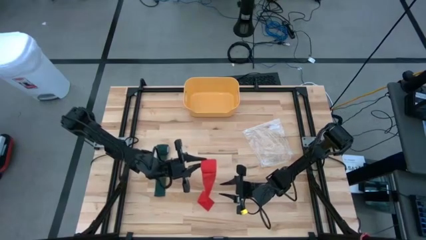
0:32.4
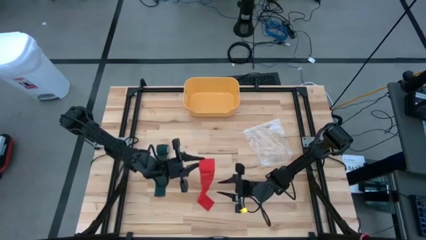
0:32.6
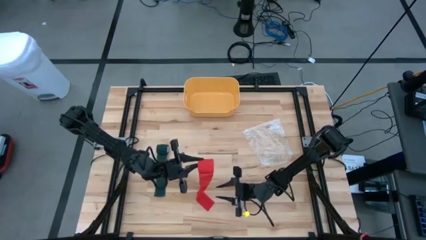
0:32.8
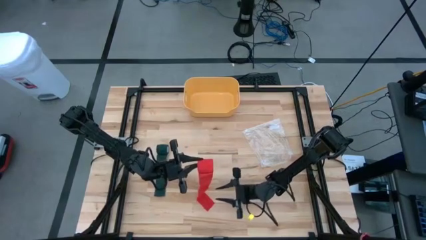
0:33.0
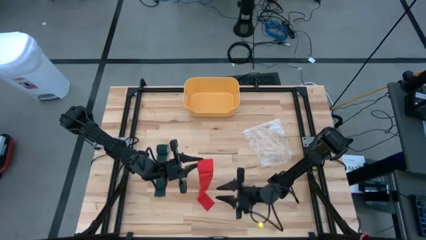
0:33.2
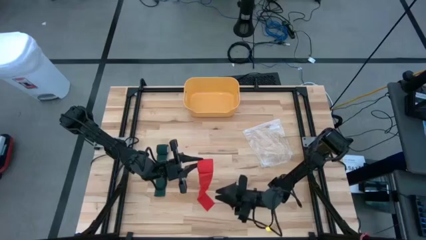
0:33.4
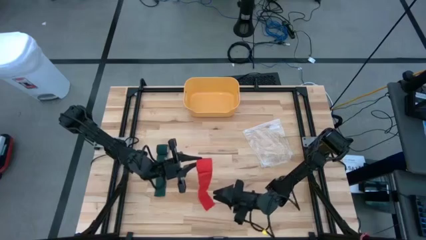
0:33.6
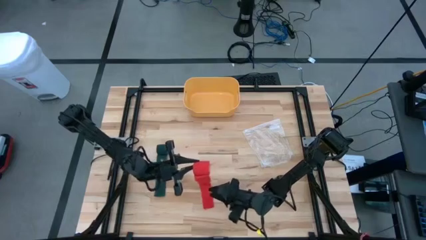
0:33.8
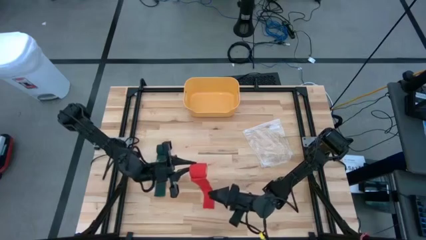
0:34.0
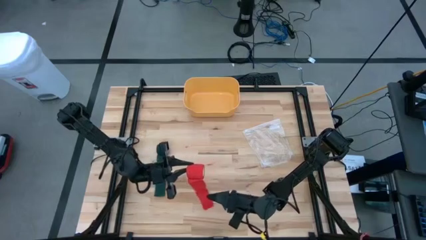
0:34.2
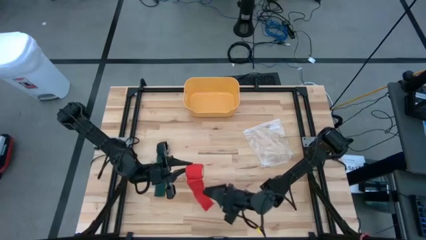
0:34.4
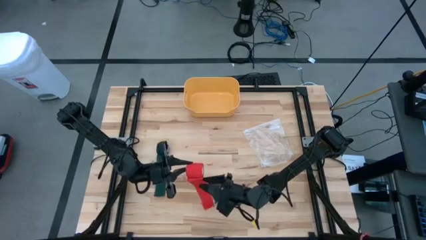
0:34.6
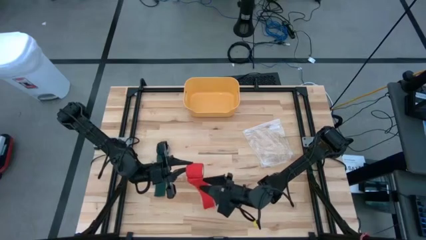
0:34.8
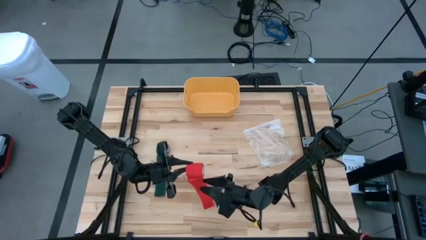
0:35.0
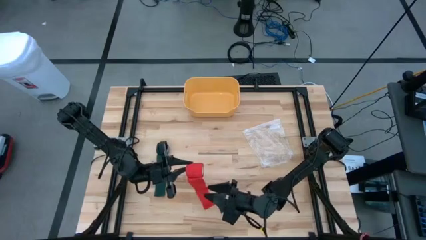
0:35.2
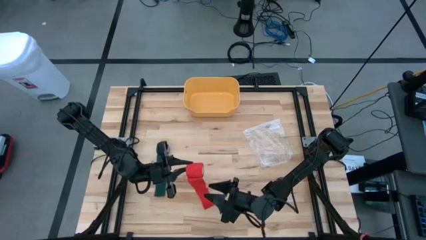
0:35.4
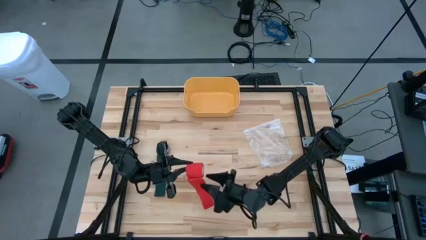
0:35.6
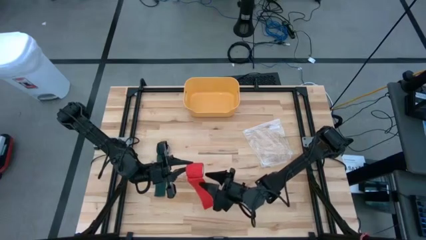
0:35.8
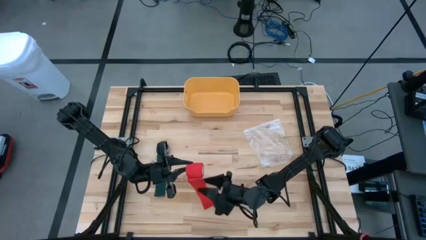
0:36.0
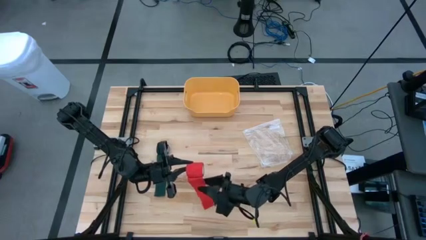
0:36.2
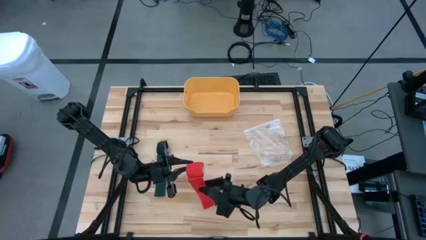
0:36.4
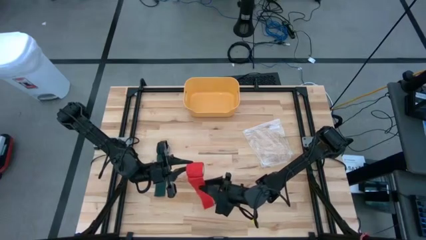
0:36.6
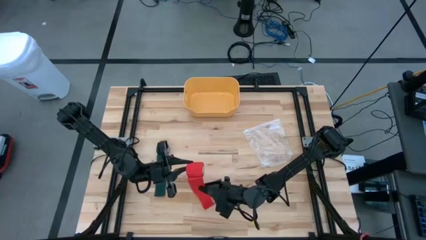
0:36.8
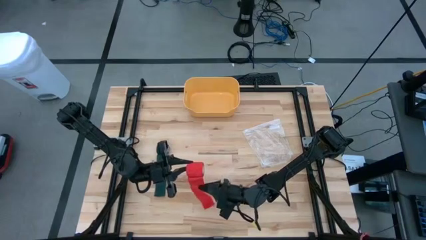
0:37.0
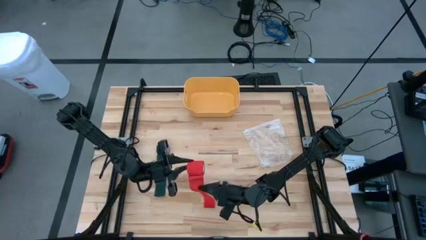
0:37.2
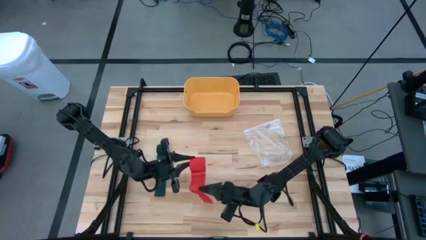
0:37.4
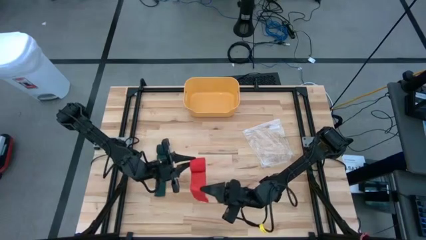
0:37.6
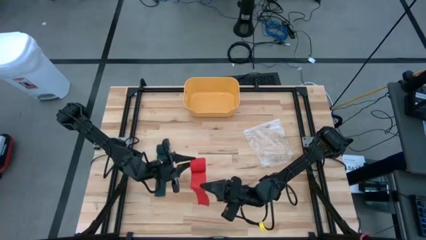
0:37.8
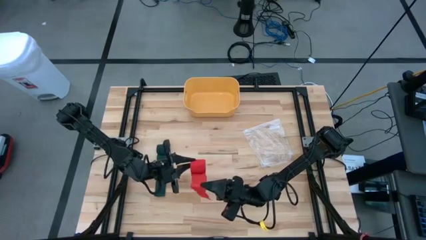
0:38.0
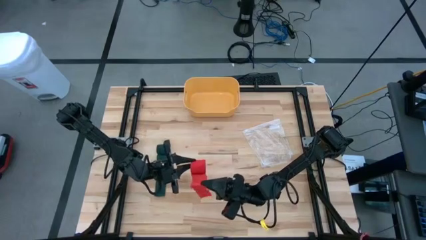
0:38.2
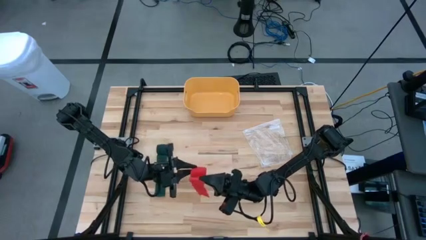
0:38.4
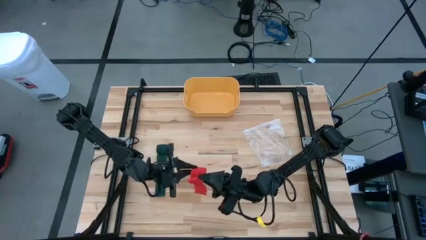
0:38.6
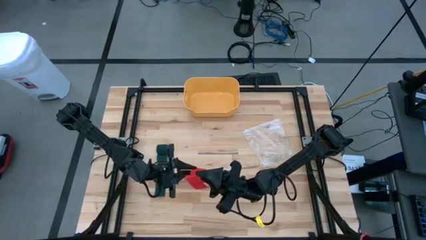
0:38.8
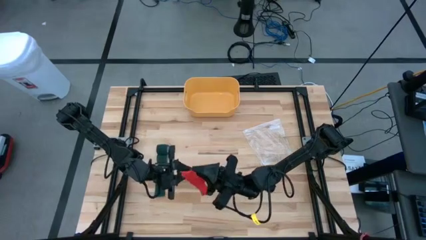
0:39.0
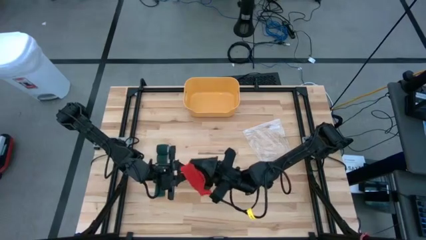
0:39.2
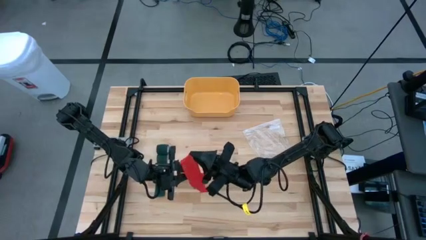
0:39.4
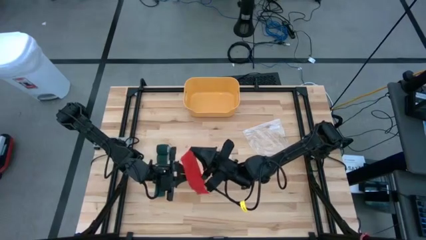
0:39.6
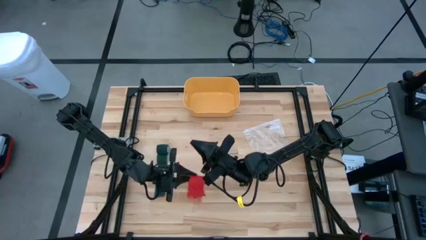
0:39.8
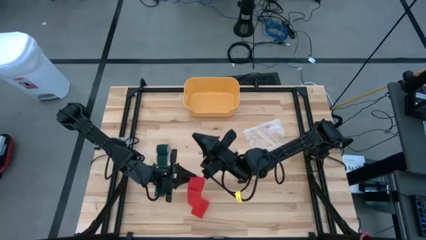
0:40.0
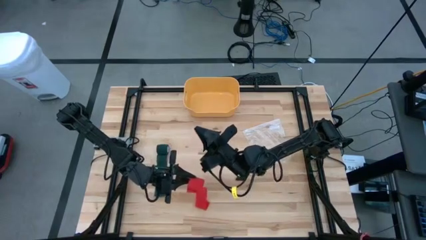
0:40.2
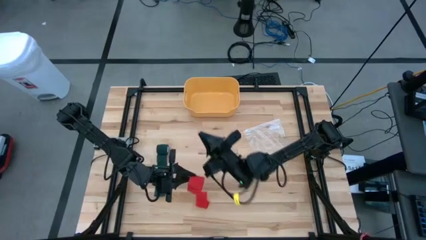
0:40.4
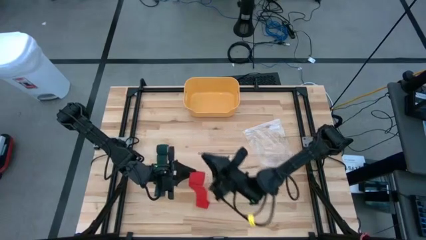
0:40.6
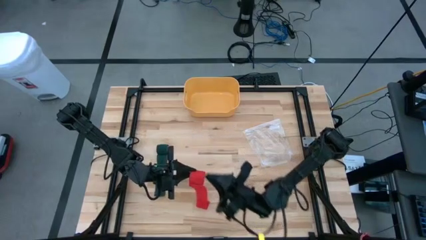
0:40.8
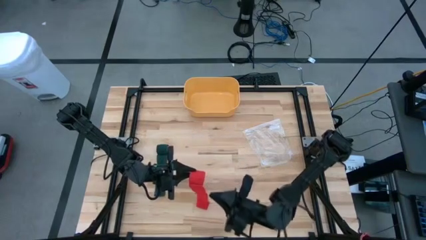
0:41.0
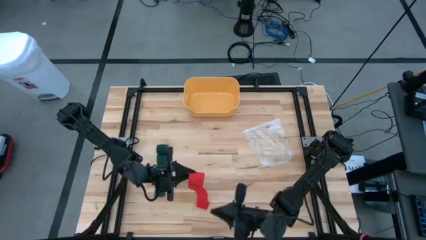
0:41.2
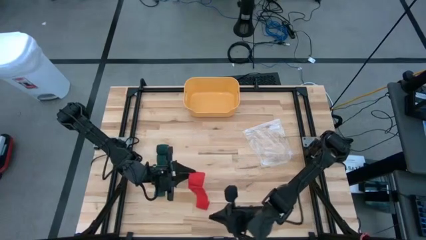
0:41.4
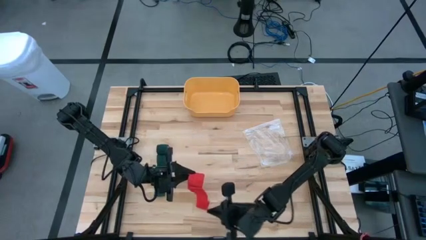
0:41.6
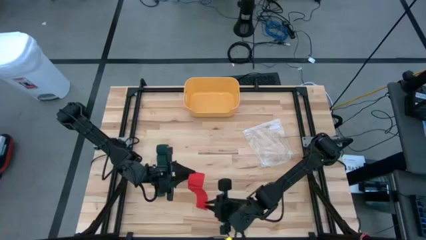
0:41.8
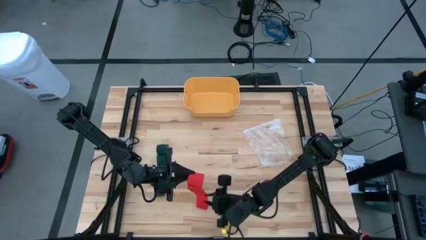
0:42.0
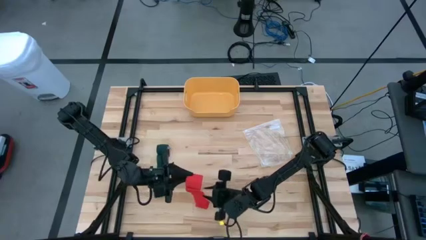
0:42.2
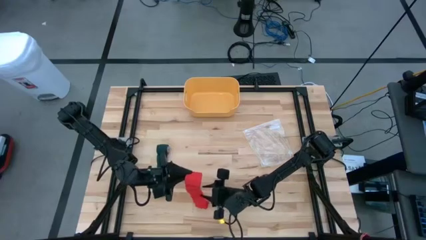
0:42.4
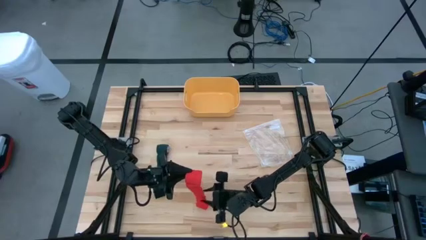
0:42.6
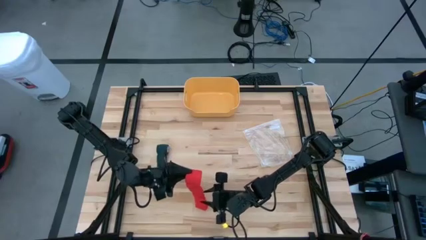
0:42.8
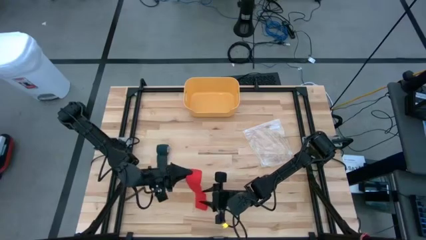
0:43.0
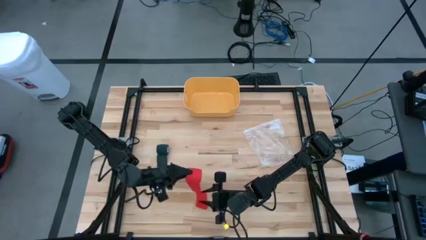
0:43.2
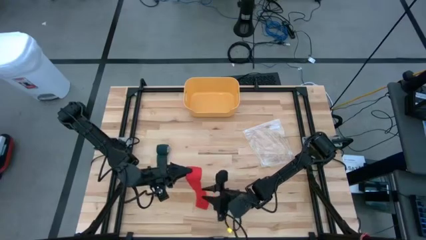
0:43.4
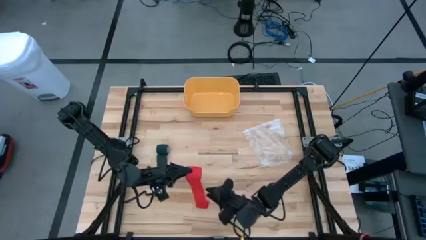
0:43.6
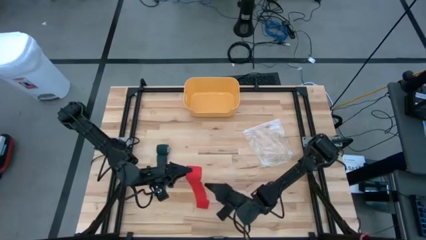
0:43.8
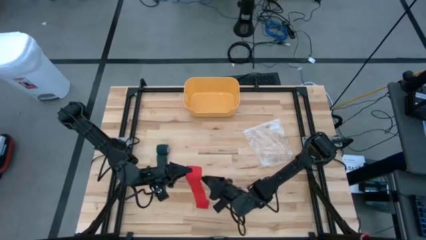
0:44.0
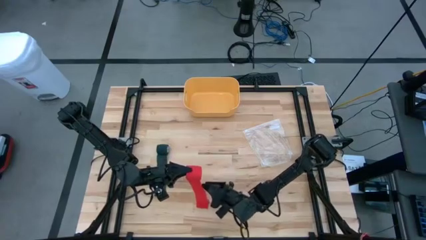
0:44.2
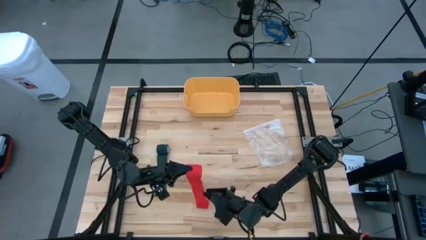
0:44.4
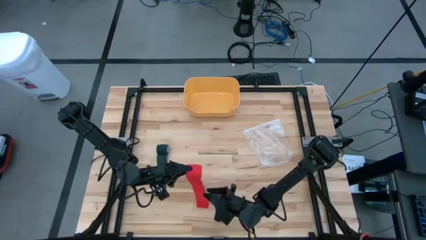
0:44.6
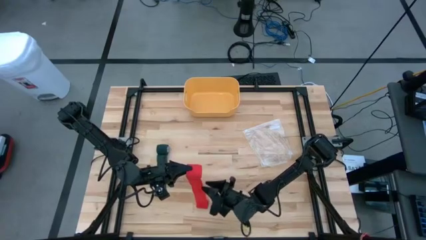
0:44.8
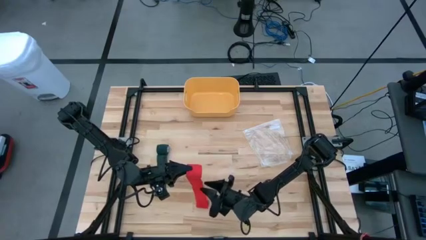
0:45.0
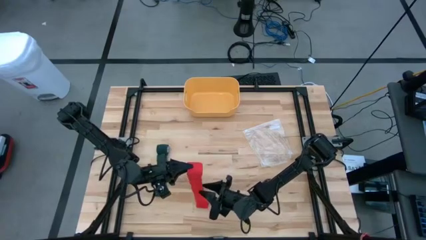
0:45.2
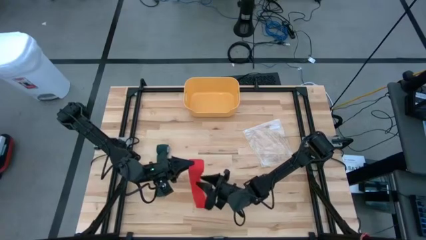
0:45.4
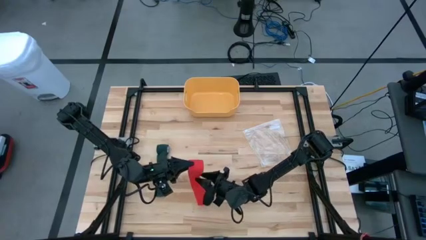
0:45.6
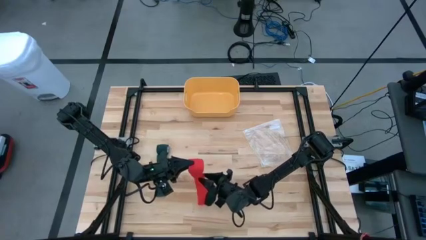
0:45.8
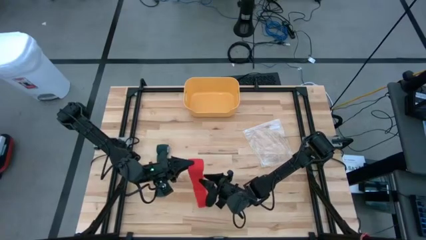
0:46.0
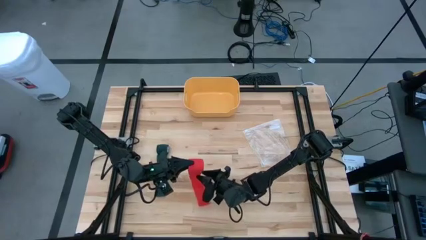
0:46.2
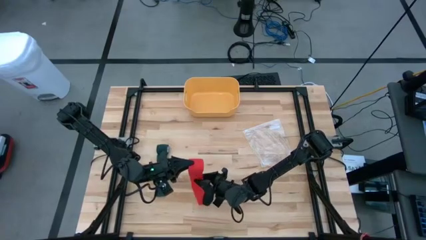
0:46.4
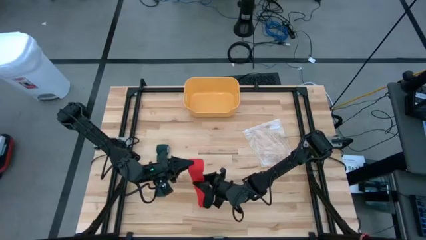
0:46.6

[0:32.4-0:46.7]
Task: Roll bandage
Roll the red bandage
